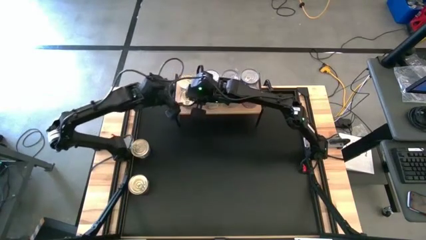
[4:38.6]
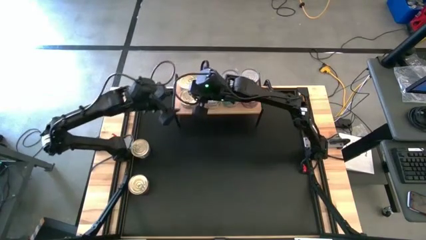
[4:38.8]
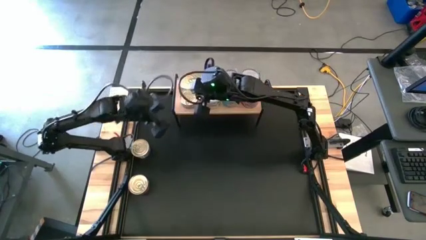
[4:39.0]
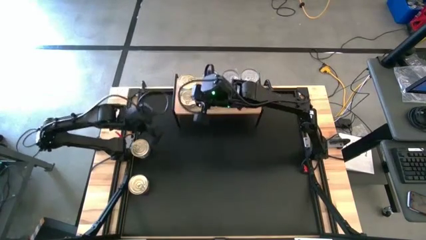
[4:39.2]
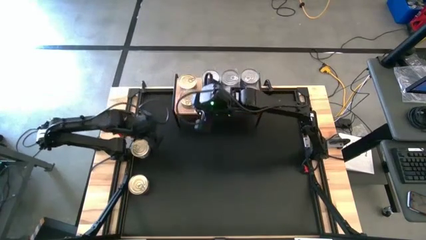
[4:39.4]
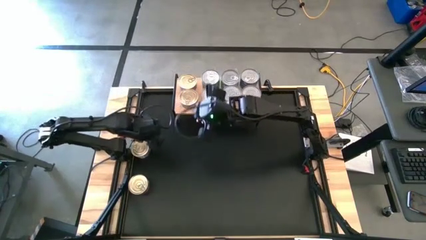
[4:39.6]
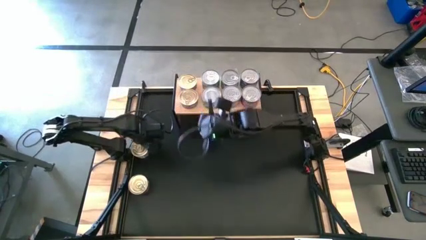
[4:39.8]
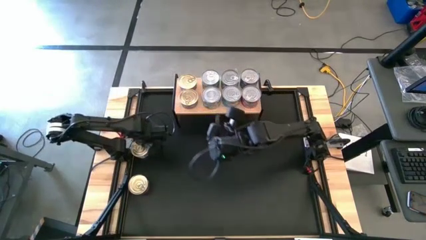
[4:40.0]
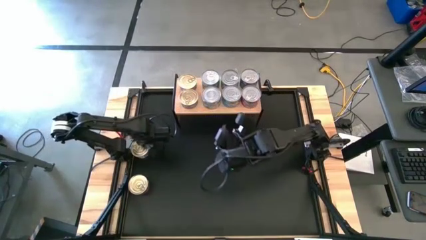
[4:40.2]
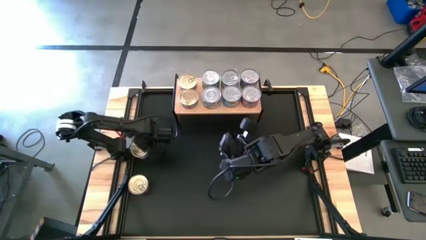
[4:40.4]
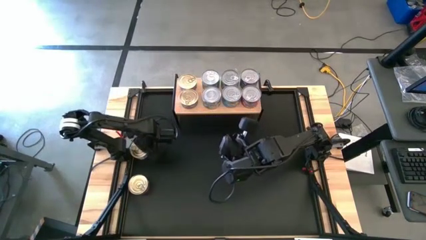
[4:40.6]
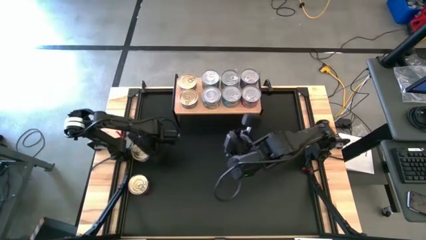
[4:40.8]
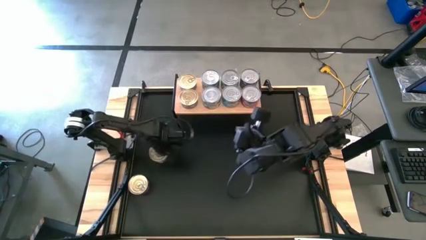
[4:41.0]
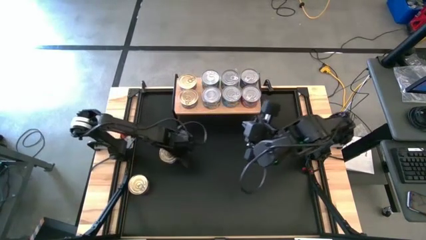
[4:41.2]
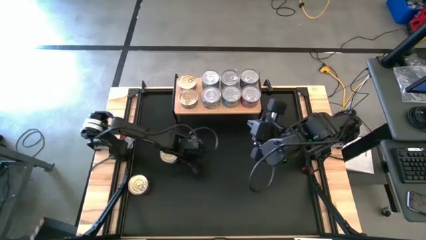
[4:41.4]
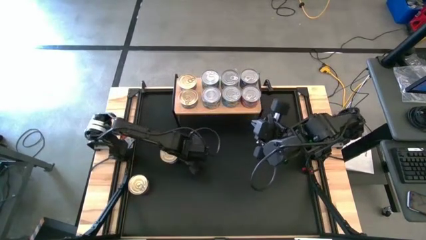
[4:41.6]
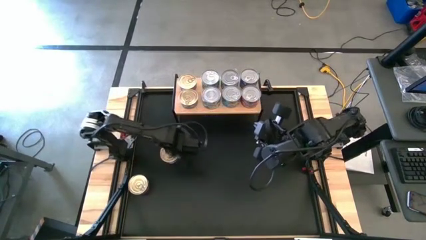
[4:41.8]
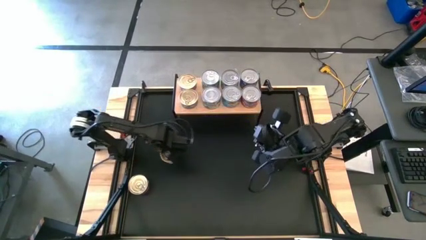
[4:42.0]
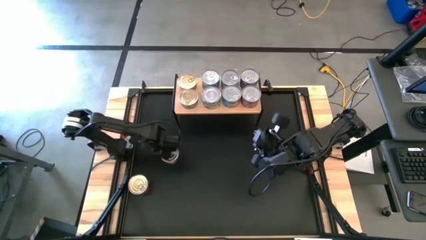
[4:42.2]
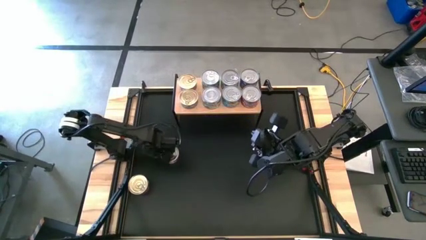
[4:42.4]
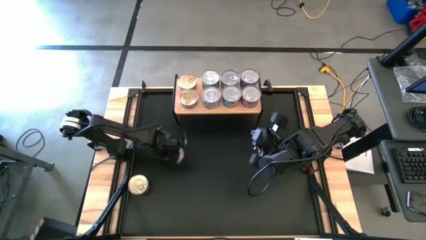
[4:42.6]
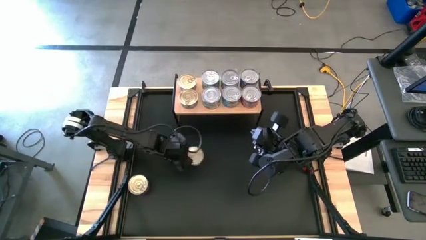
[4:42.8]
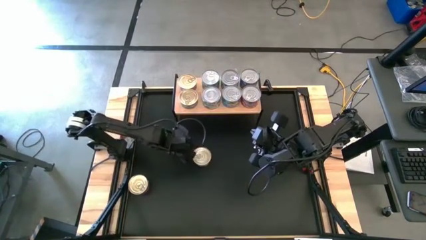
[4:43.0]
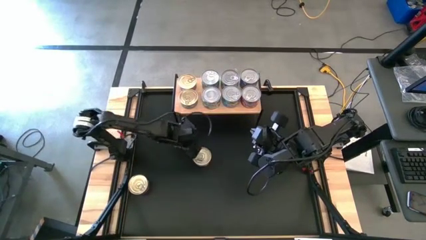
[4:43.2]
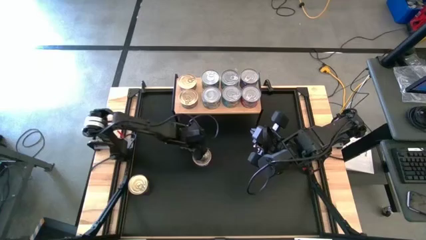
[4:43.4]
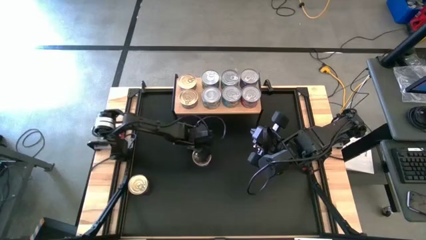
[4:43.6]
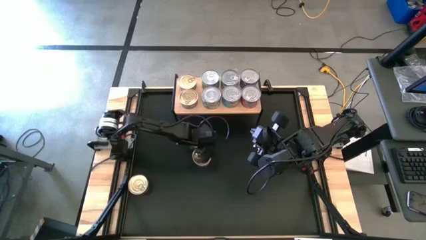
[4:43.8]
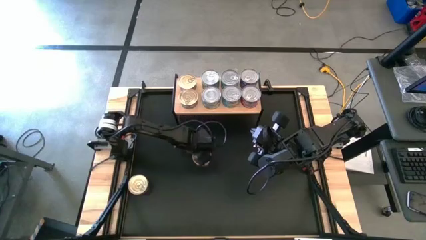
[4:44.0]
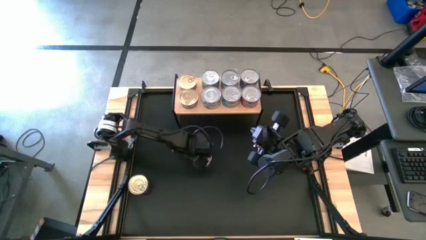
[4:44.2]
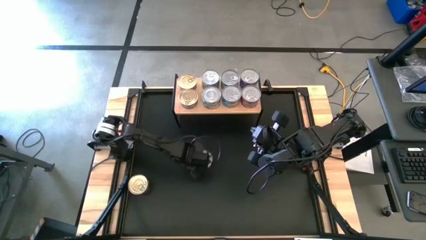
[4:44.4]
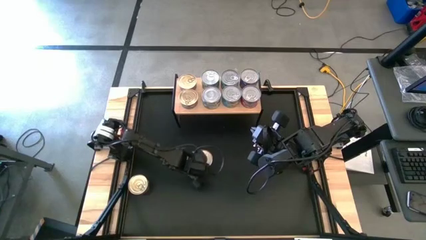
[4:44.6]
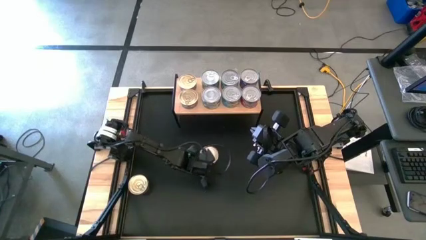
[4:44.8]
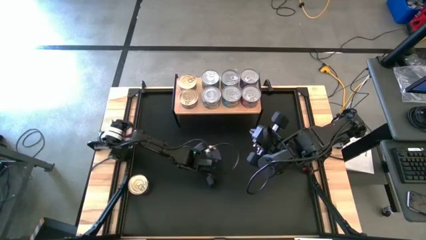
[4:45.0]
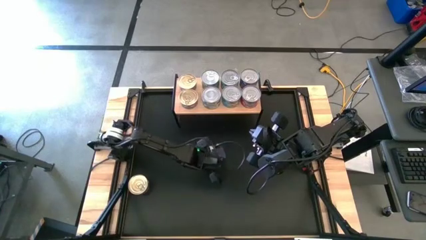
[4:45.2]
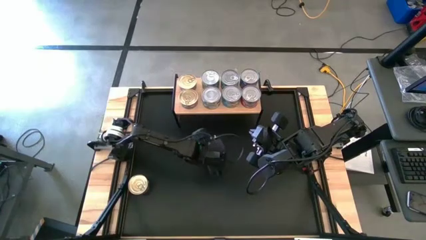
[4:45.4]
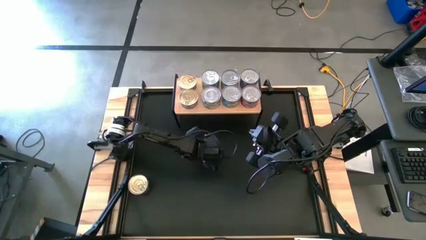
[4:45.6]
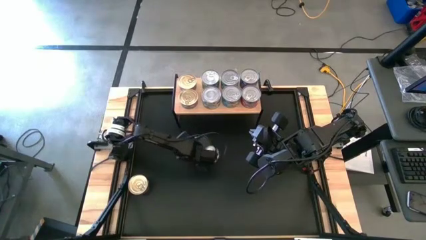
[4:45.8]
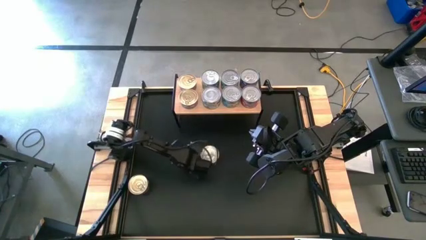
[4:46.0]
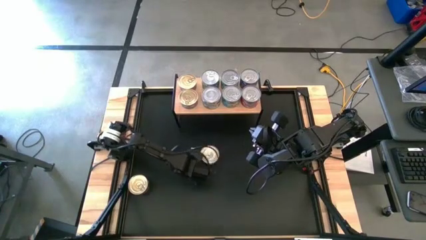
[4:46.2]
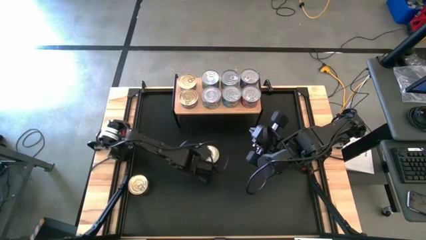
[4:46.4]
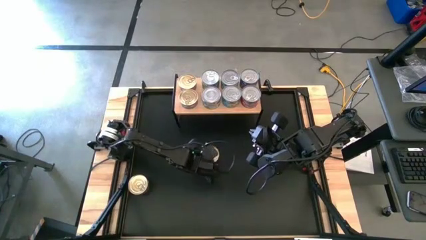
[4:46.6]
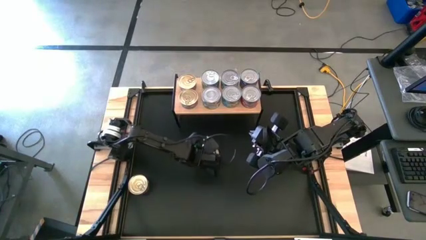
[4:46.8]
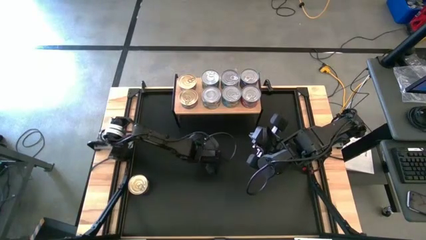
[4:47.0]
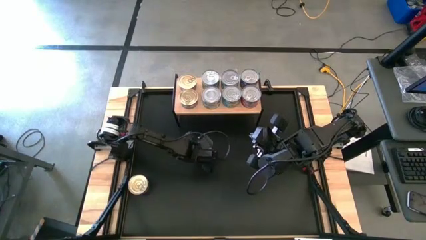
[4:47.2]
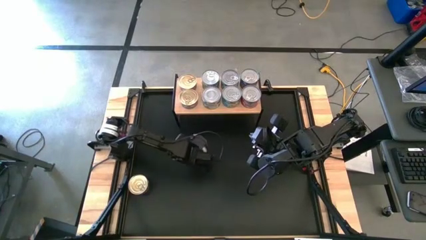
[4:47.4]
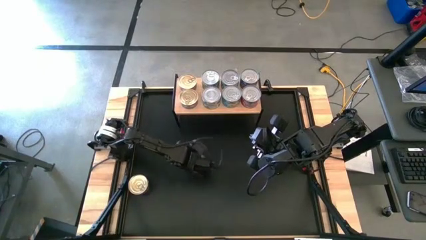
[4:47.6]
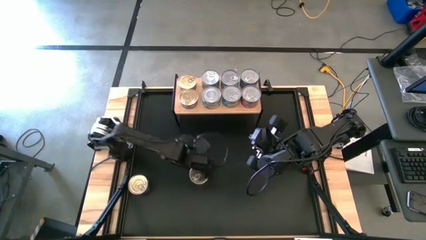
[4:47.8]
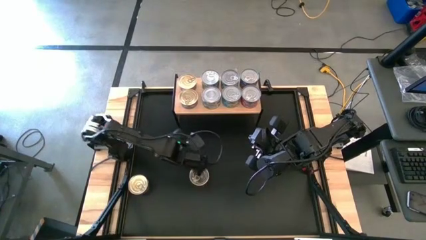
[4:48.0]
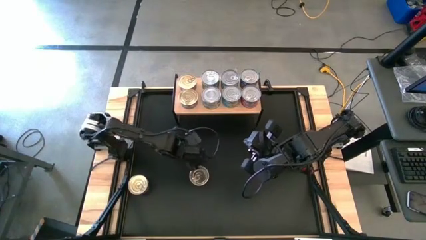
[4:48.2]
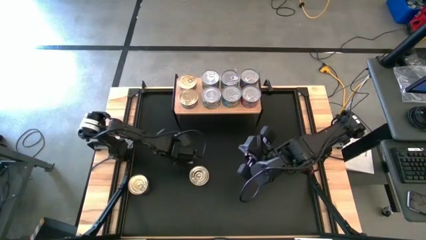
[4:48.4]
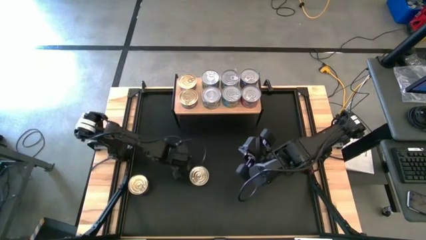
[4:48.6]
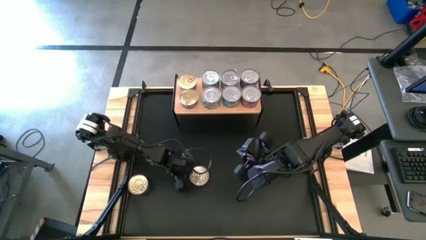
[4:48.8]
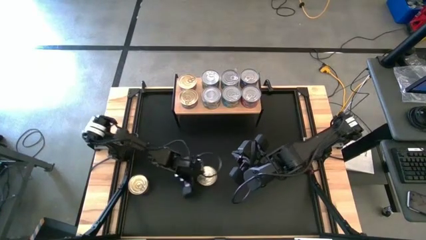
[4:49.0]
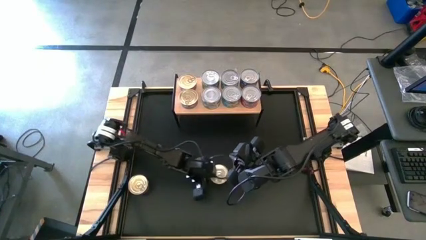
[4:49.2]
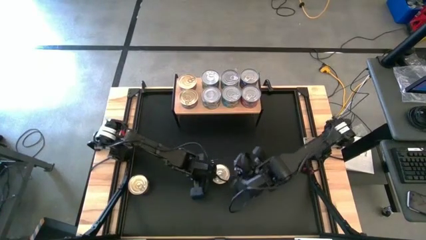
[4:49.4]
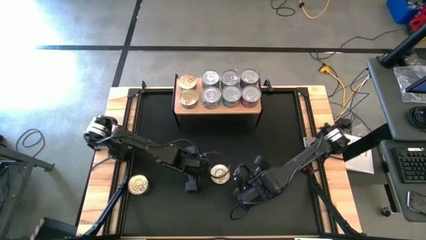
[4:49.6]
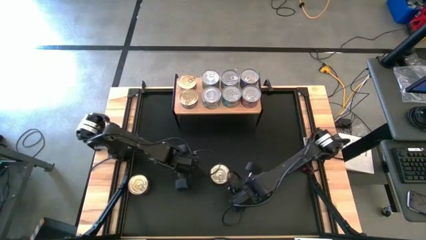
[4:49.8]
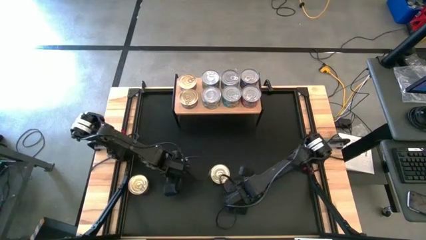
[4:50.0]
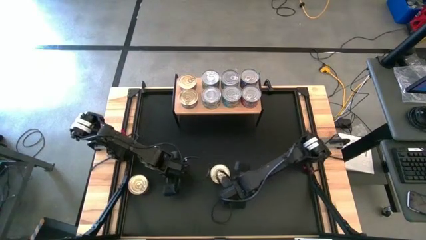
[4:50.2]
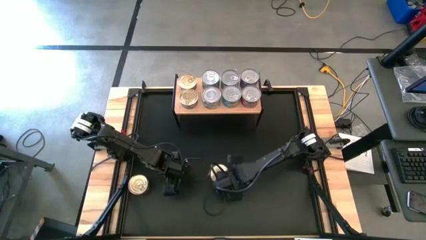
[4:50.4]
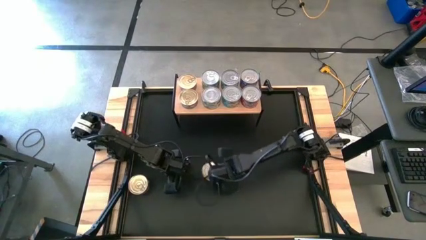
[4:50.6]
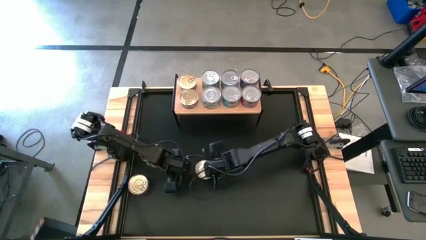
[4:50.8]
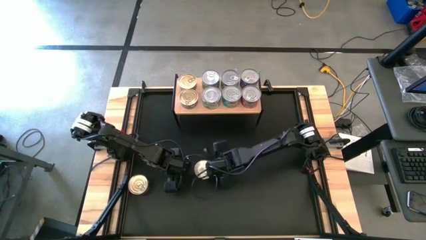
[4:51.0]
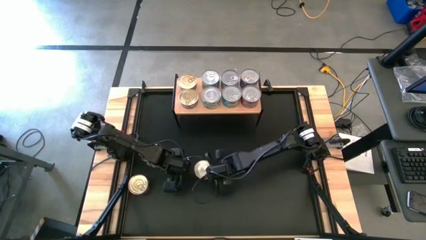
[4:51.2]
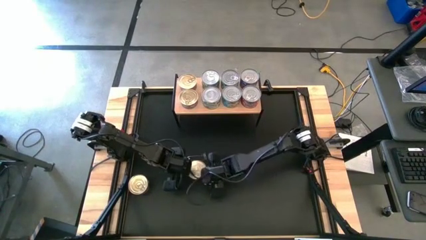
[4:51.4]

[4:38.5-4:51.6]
Task: Stack canned seafood by type on shelf
Stack the blue pink tuna can on top of the other blue pink tuna can on the shelf
